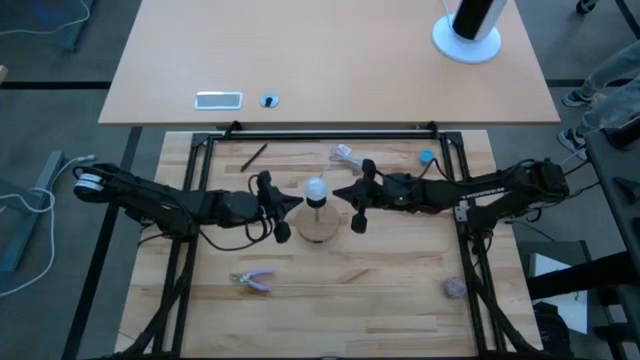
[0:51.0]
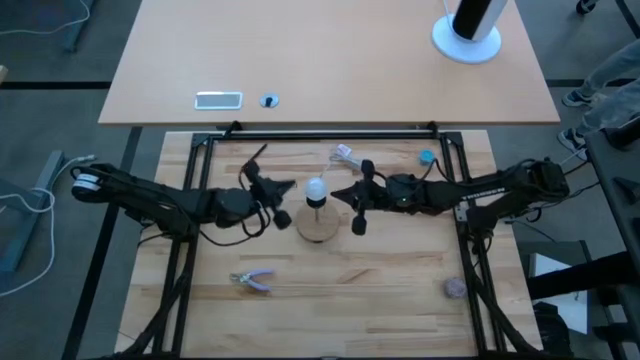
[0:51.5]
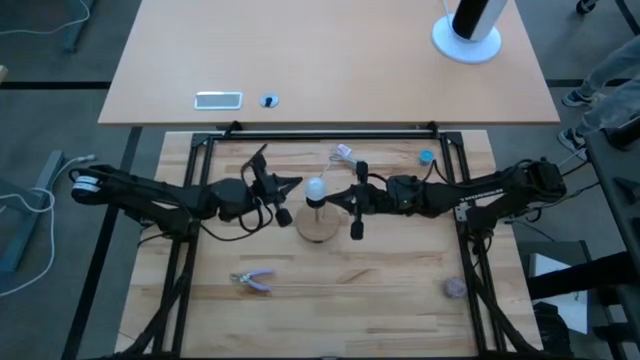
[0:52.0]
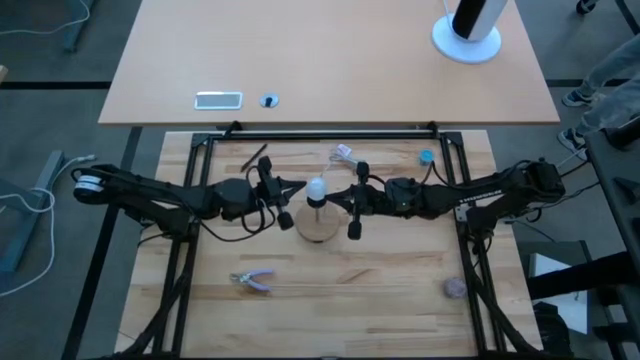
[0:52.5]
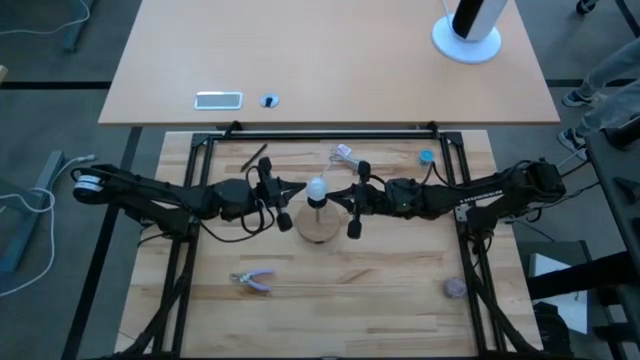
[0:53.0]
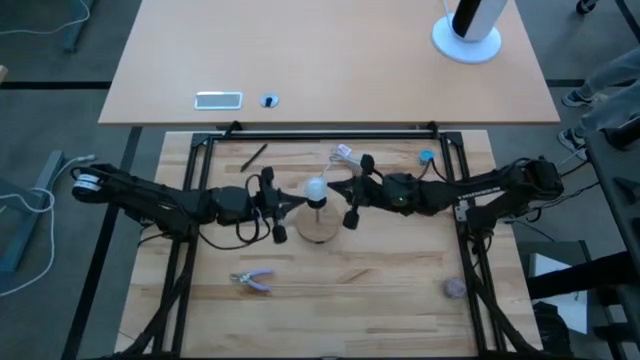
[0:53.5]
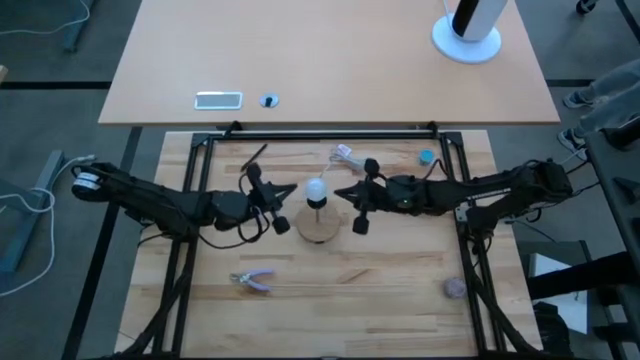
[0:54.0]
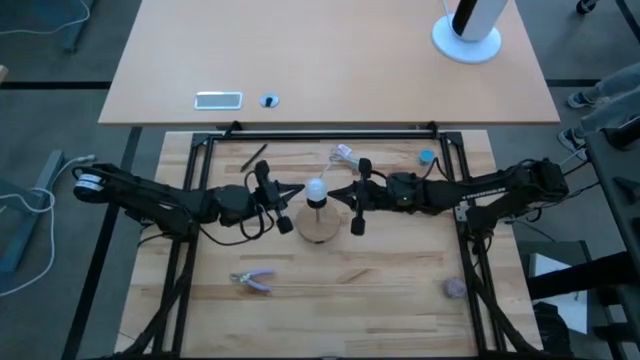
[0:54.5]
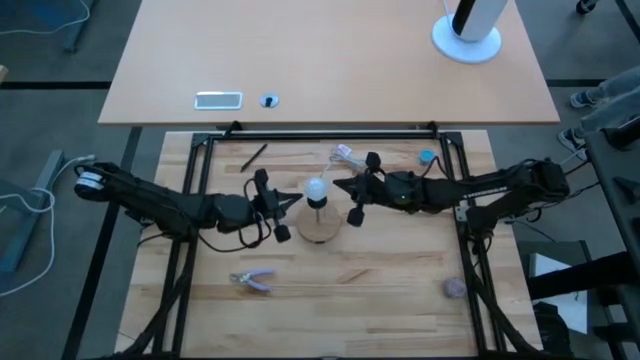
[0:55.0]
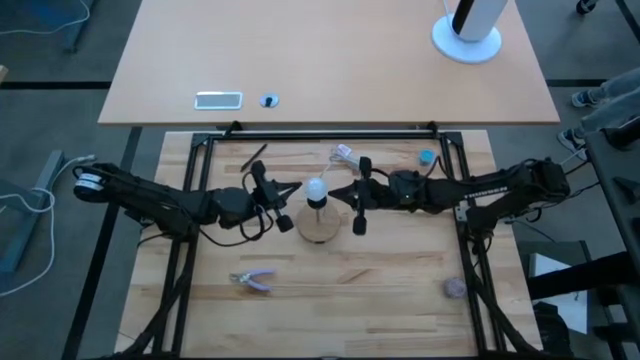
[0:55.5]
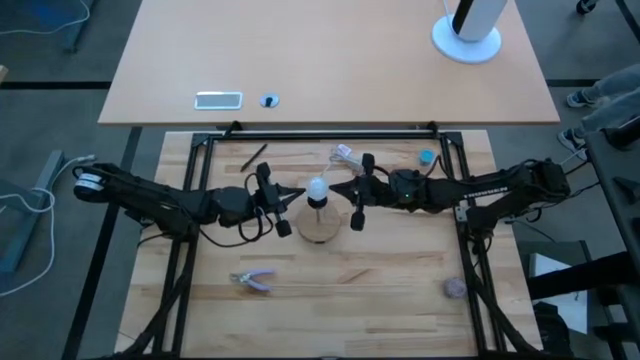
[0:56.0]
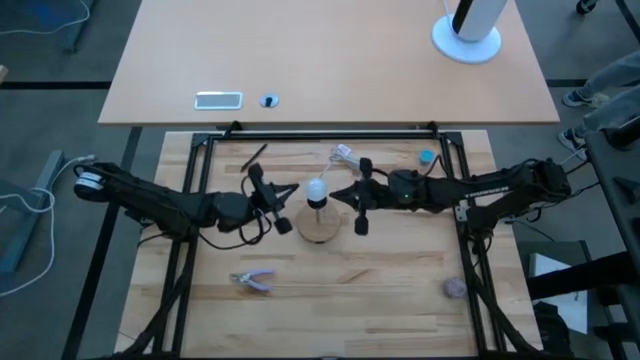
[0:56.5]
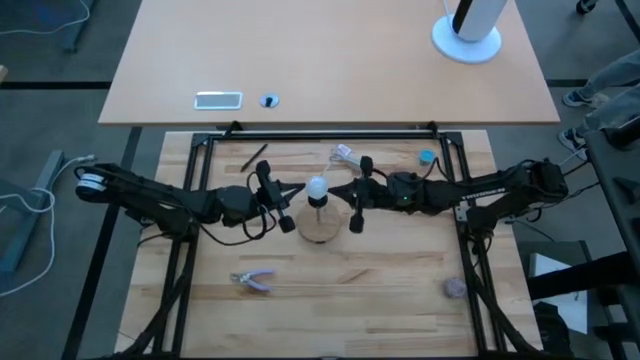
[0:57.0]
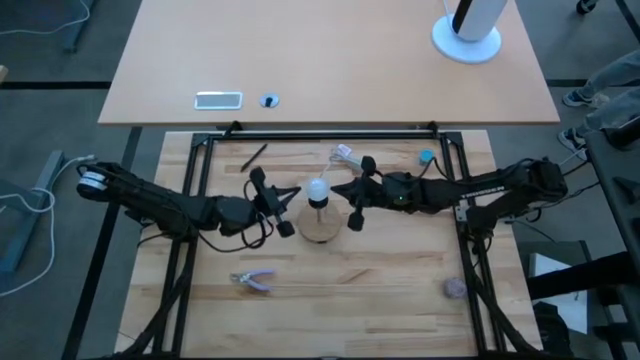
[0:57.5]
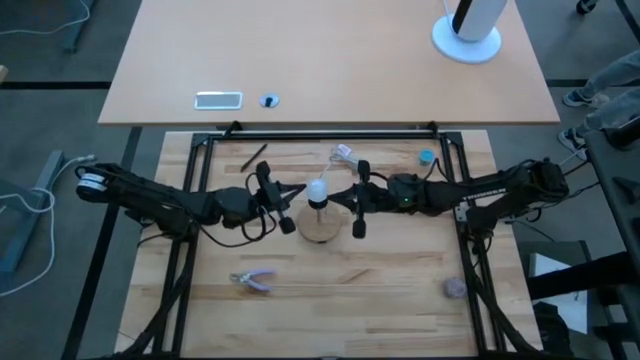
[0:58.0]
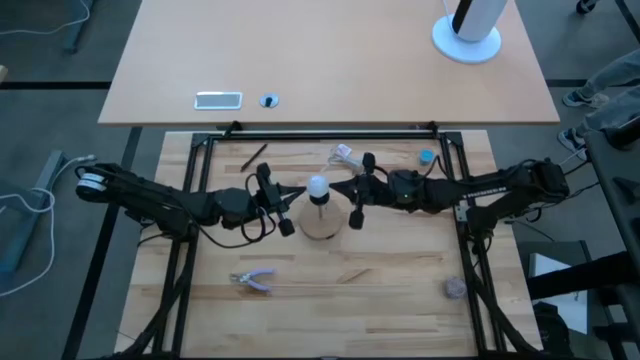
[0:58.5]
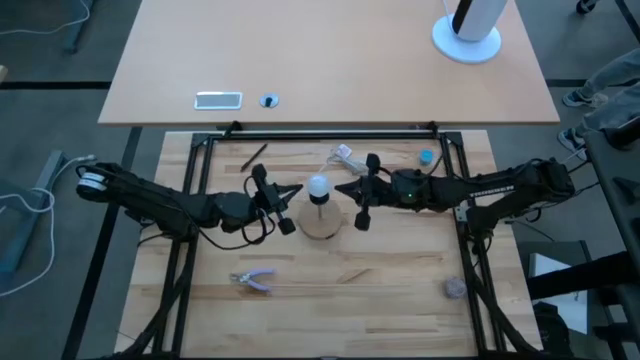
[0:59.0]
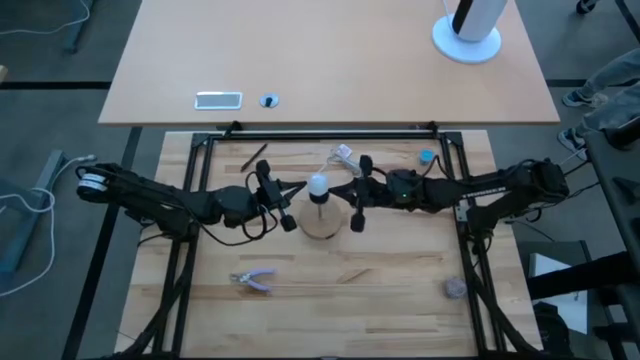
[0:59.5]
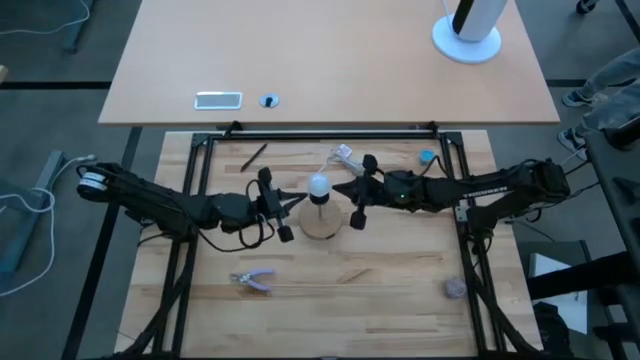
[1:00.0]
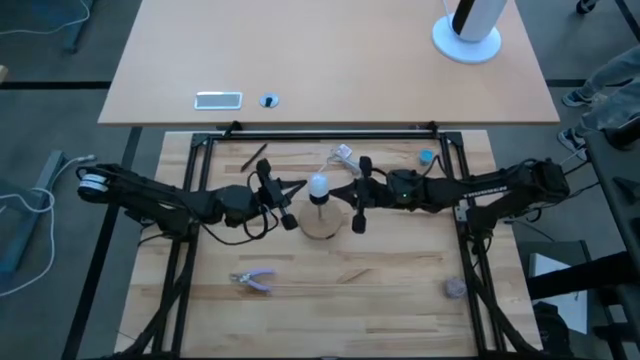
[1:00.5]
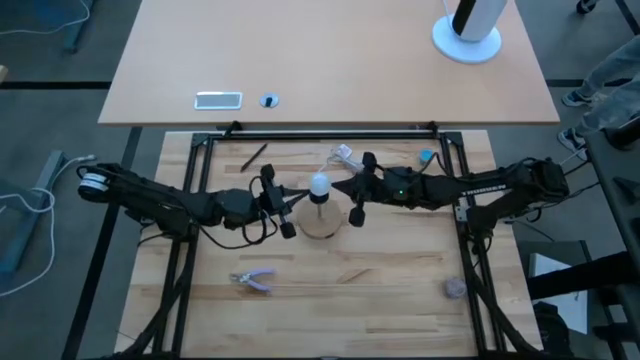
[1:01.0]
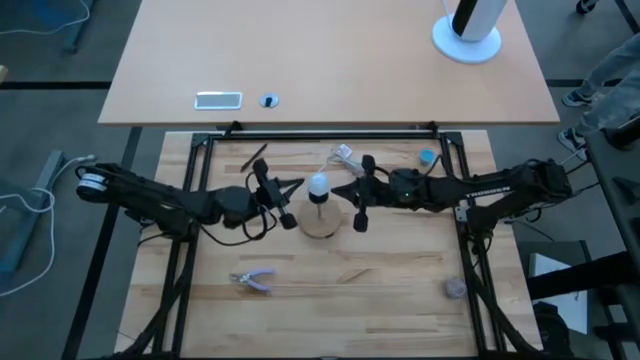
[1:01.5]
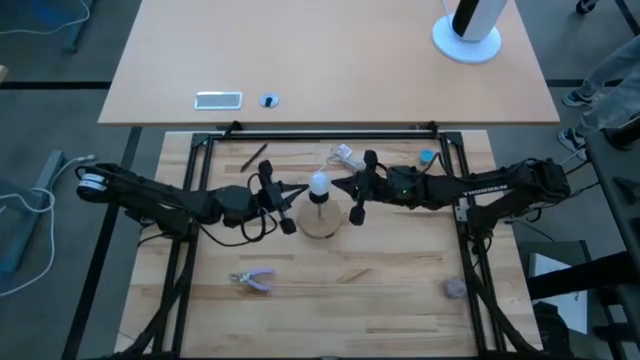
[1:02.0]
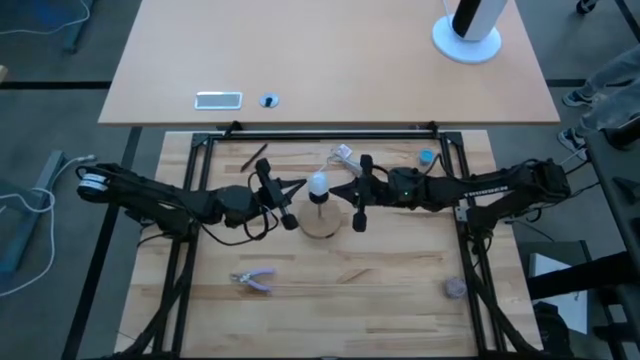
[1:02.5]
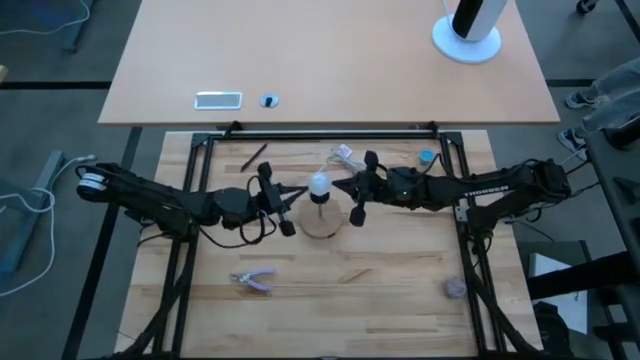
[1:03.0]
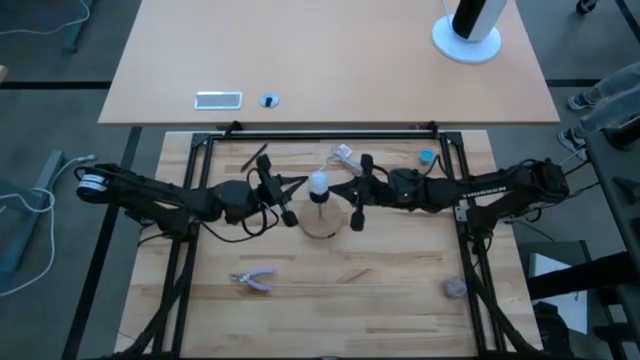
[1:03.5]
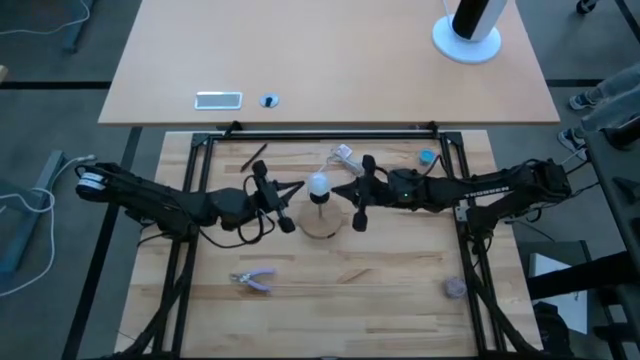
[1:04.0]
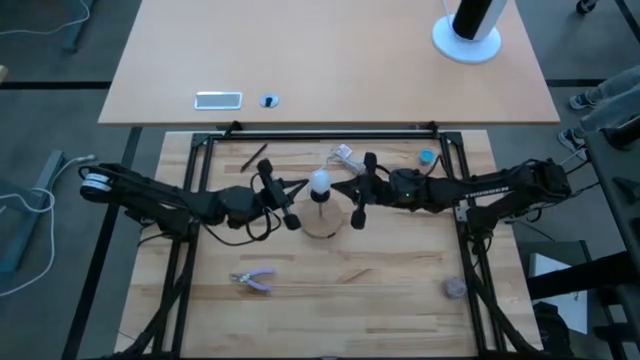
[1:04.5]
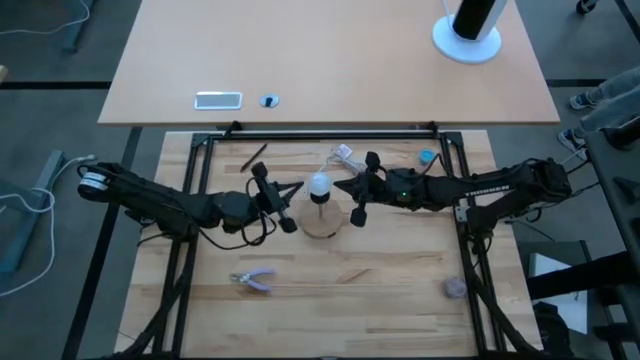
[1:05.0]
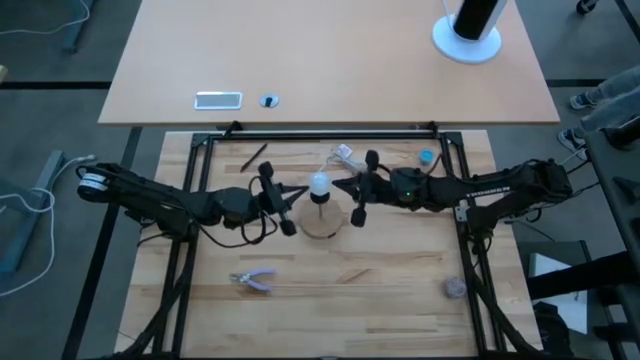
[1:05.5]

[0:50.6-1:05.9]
Task: Screw lightbulb
Remove the lightbulb from the lamp

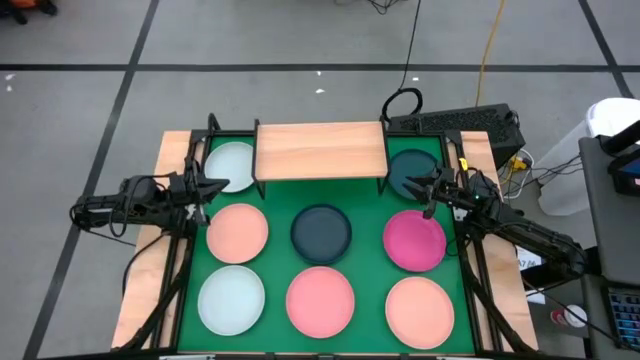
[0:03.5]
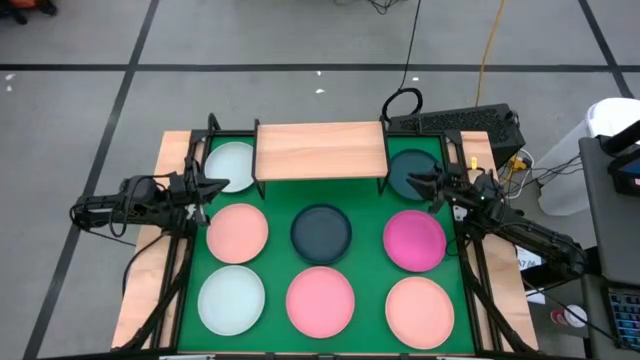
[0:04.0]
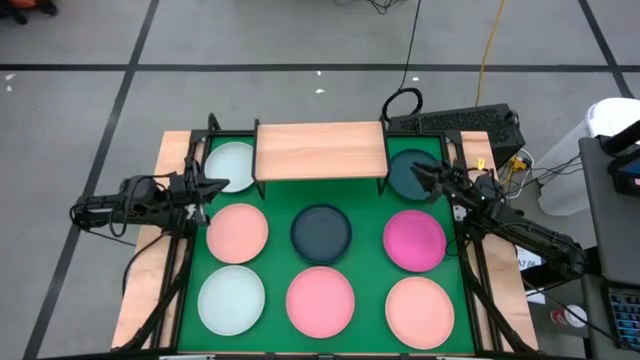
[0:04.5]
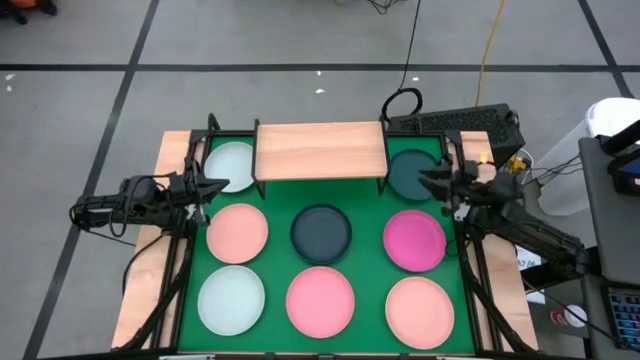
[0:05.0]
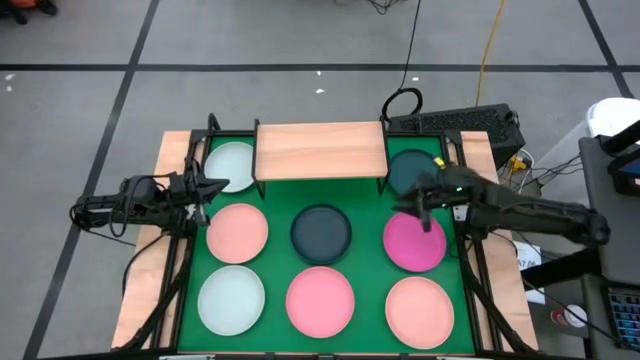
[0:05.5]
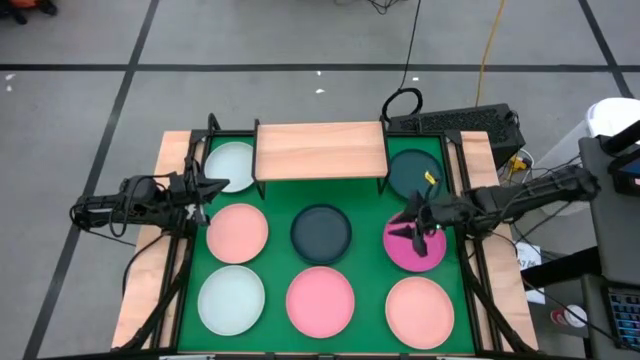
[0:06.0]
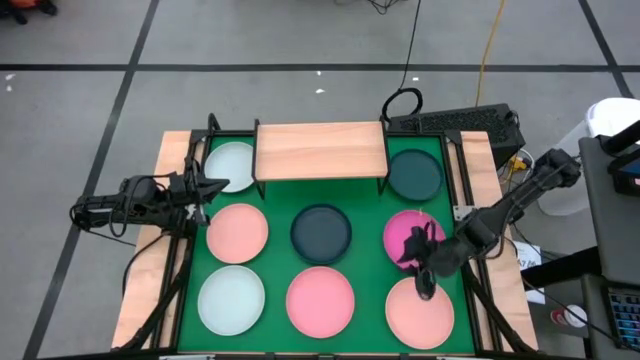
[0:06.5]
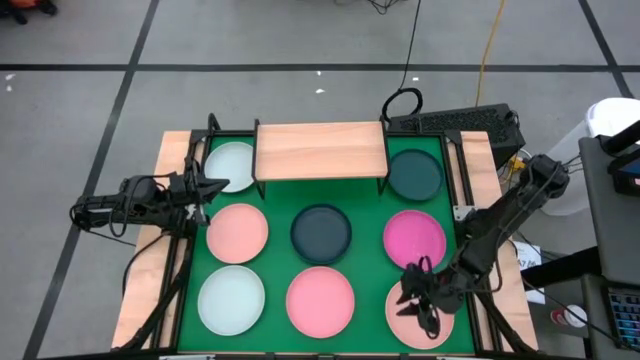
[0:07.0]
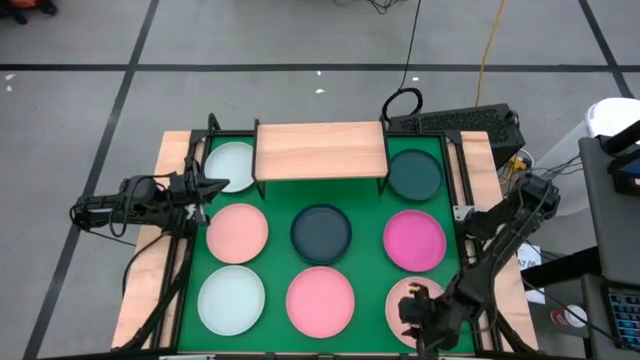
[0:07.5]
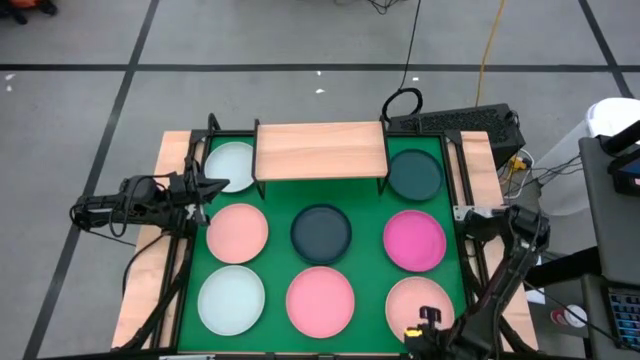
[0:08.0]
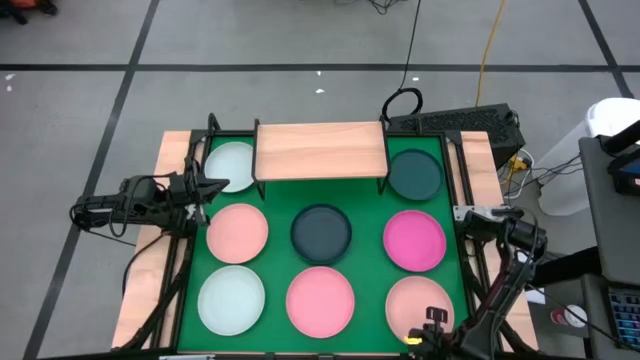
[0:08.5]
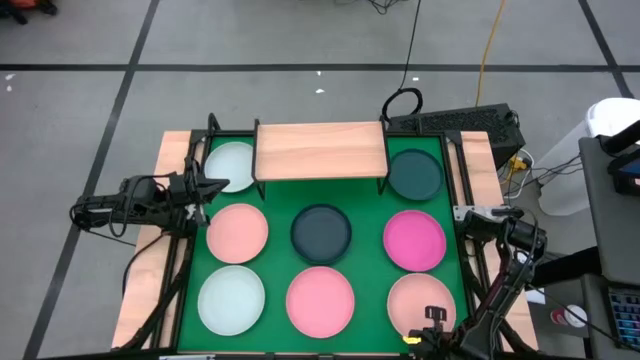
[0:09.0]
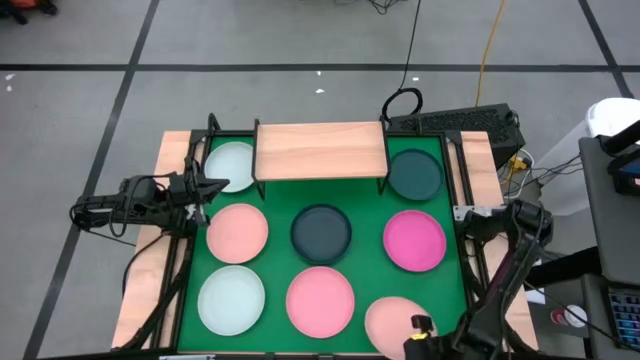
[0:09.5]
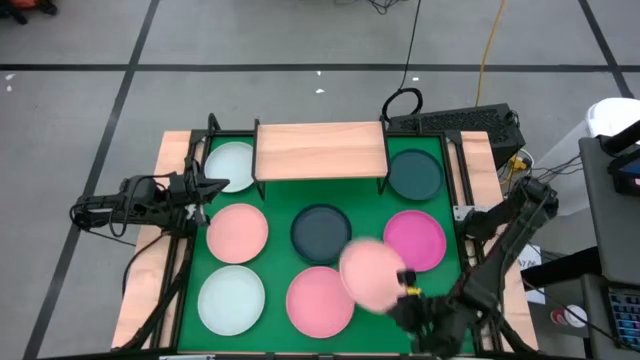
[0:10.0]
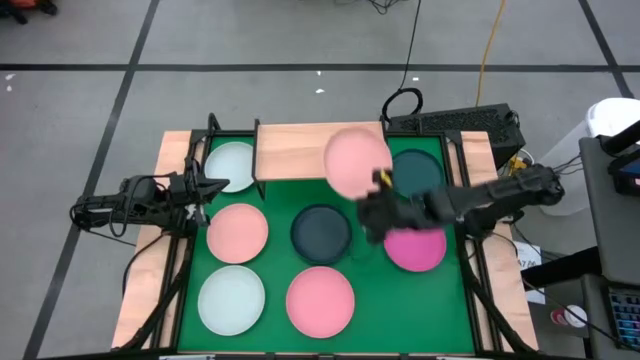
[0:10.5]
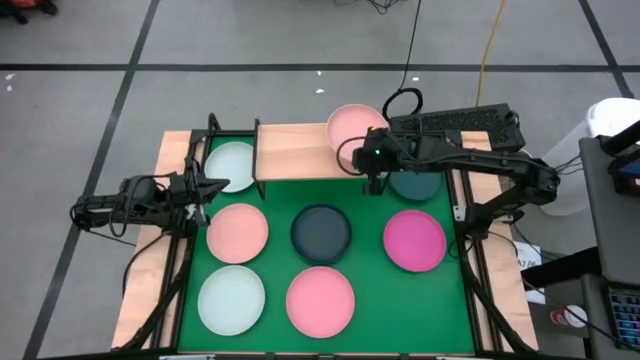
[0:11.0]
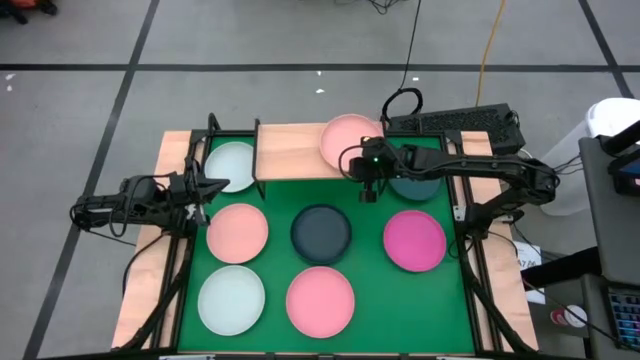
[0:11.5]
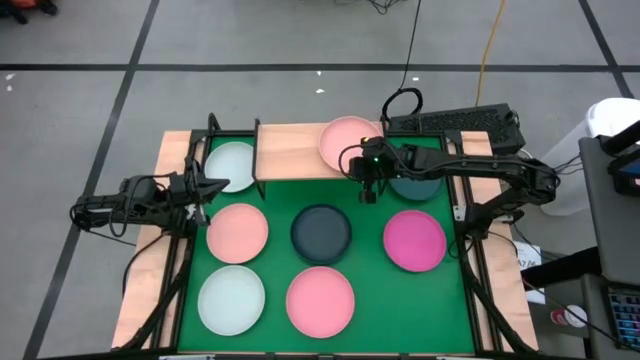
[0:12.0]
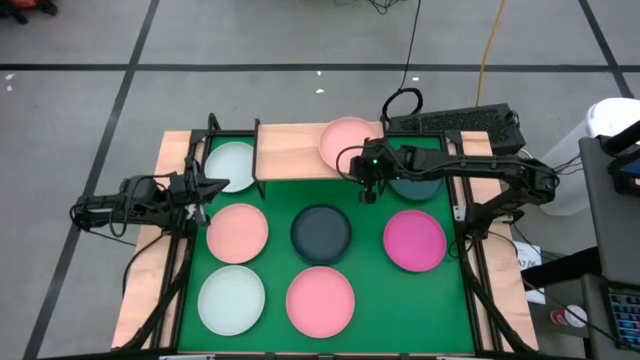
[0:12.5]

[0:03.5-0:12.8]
Task: Place and stack plates onto a shelf
Put the bottom light orange plate on the shelf
